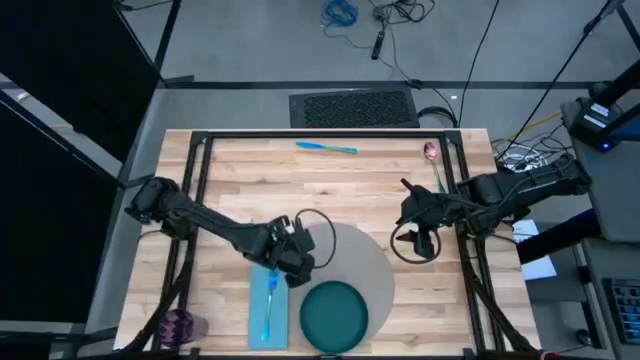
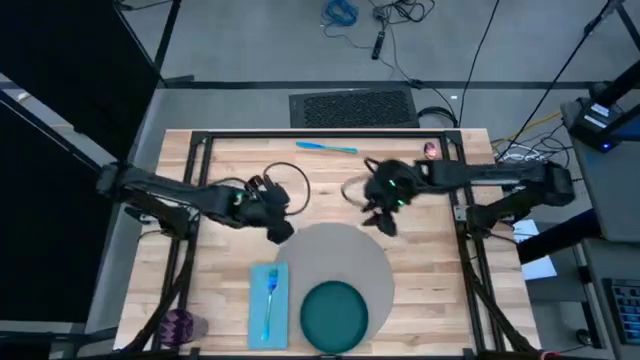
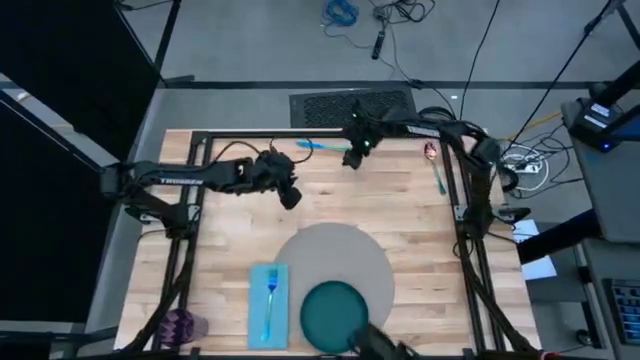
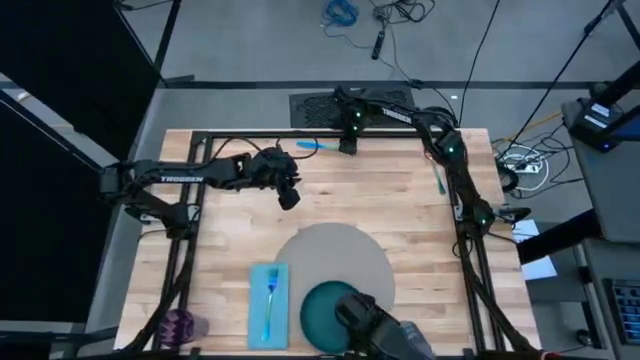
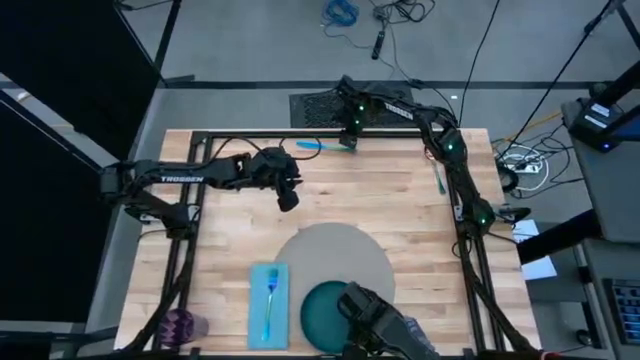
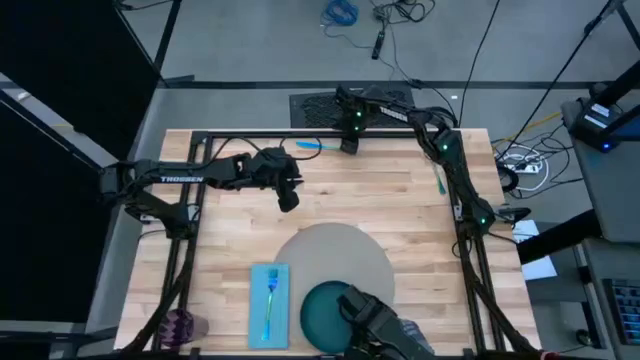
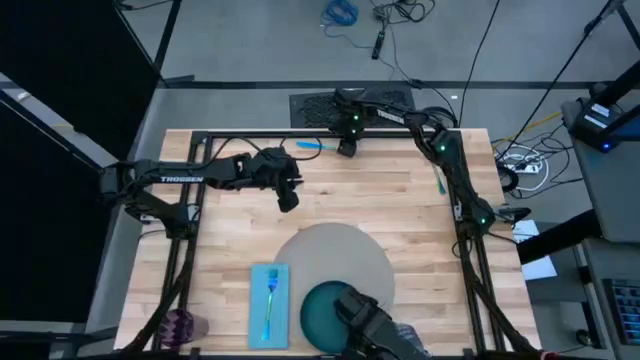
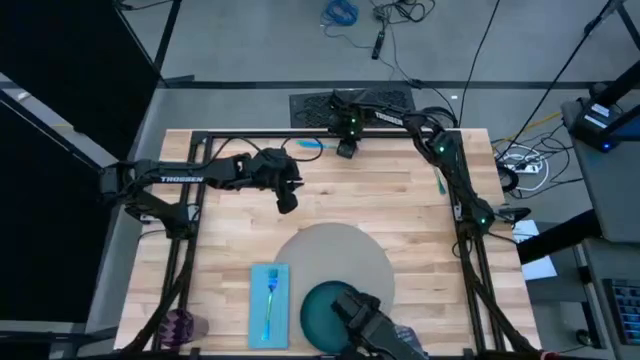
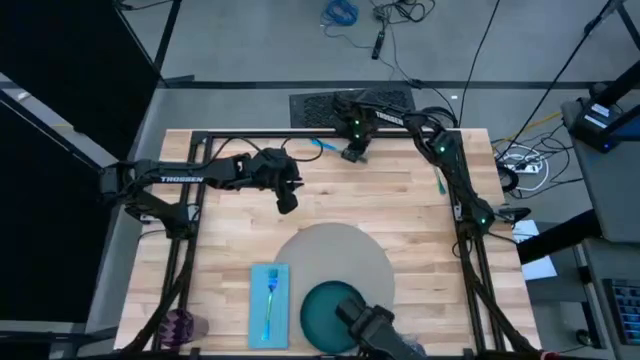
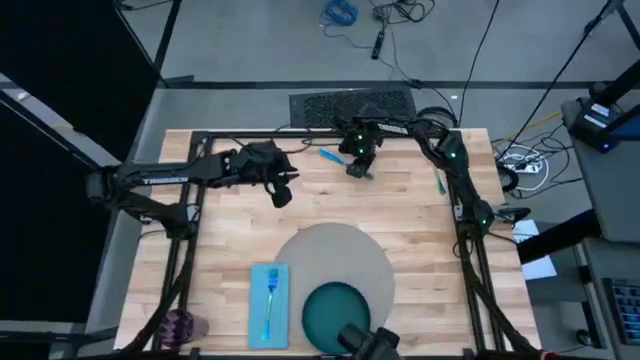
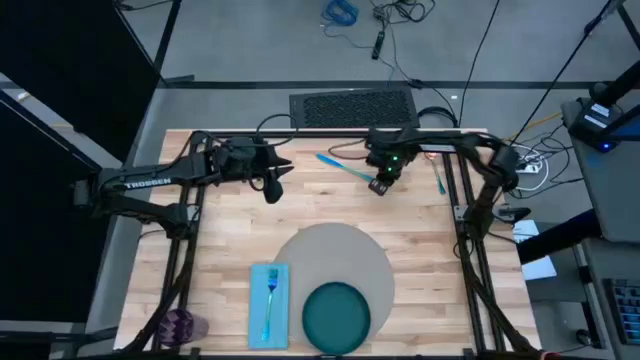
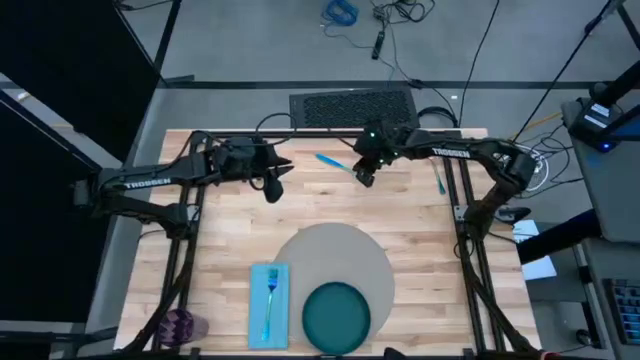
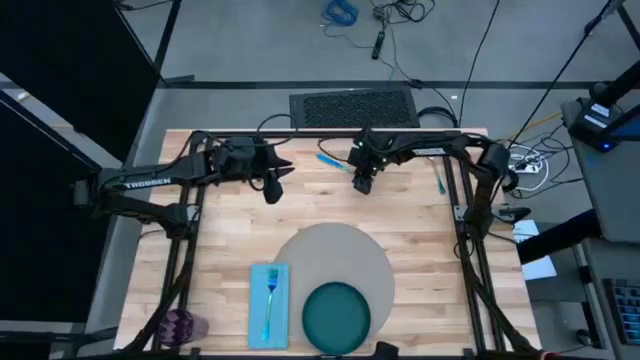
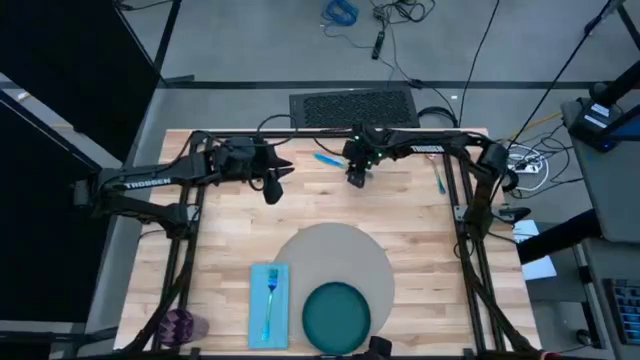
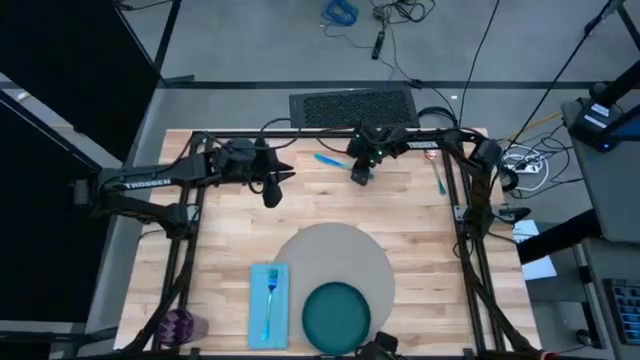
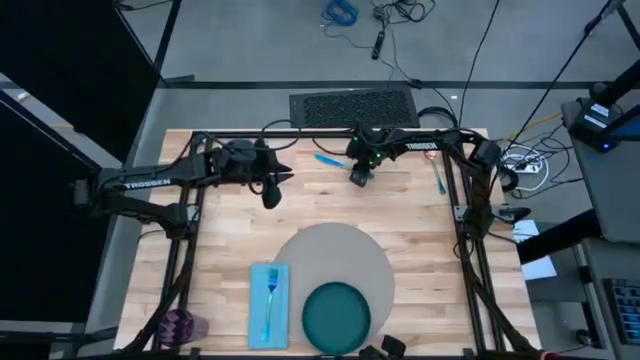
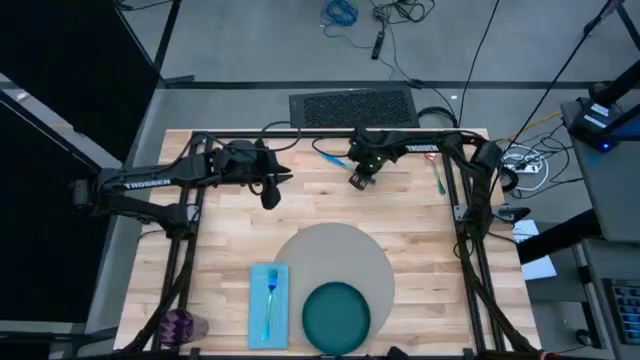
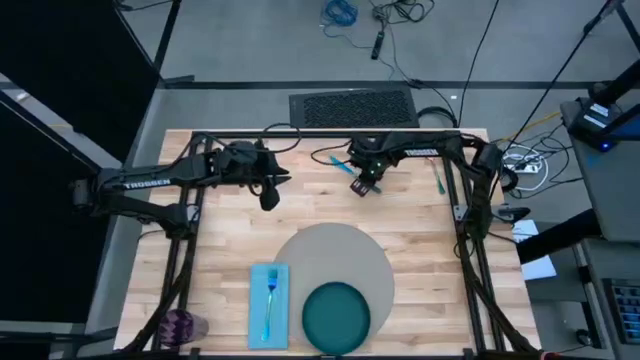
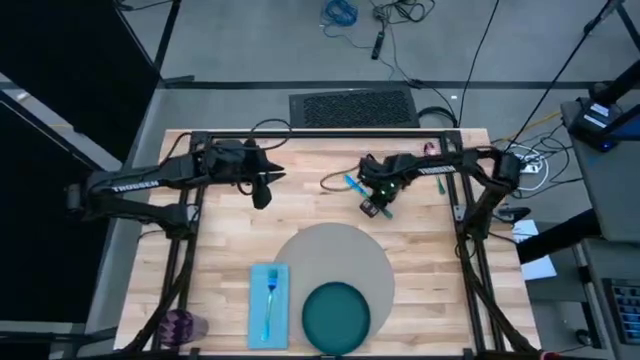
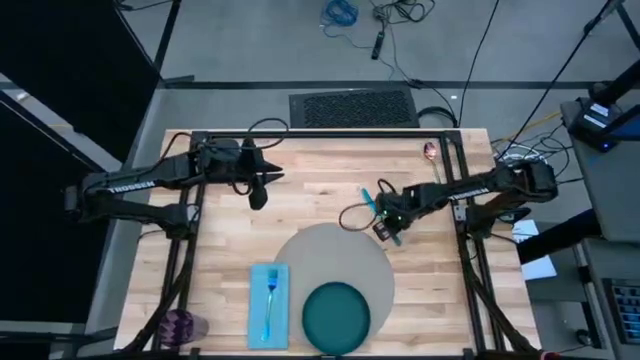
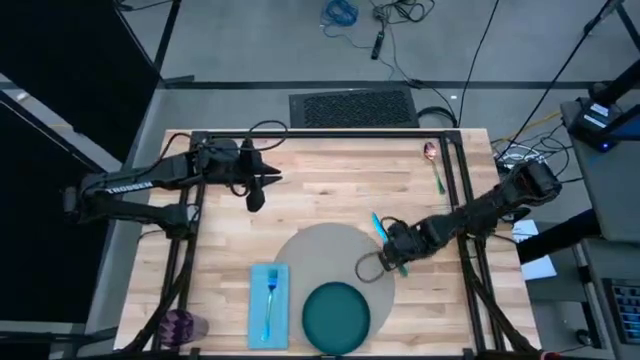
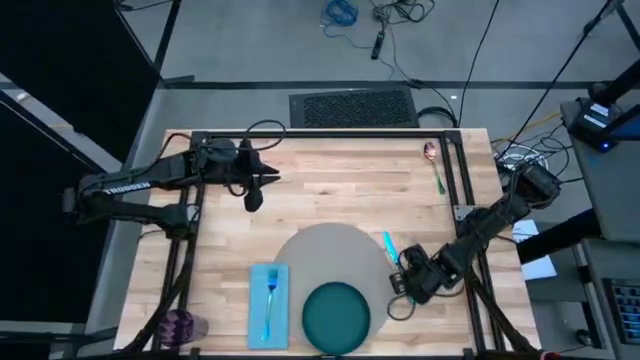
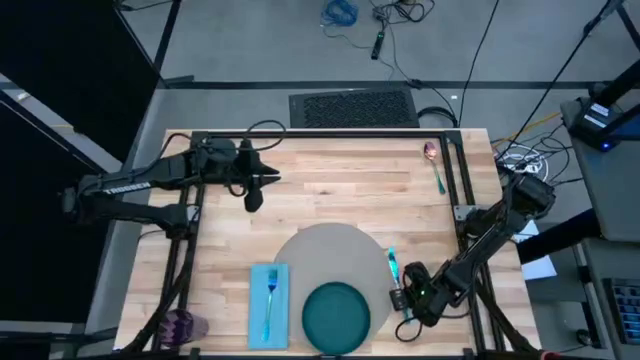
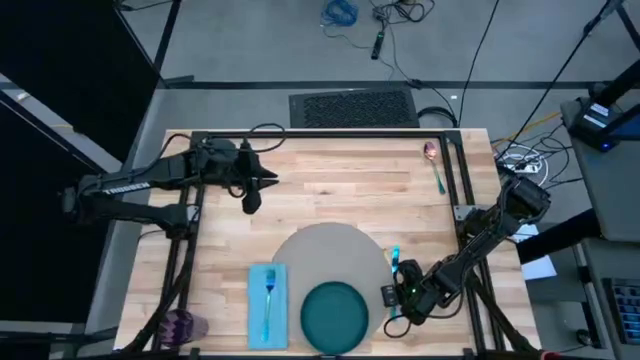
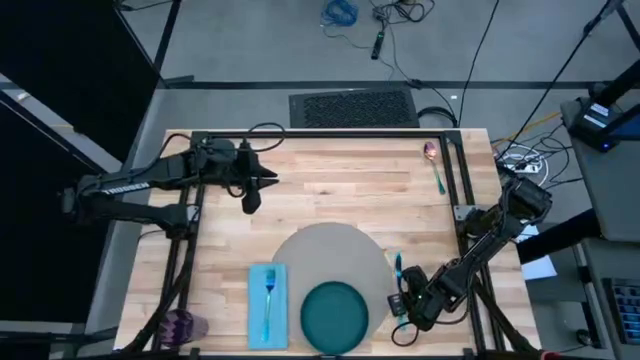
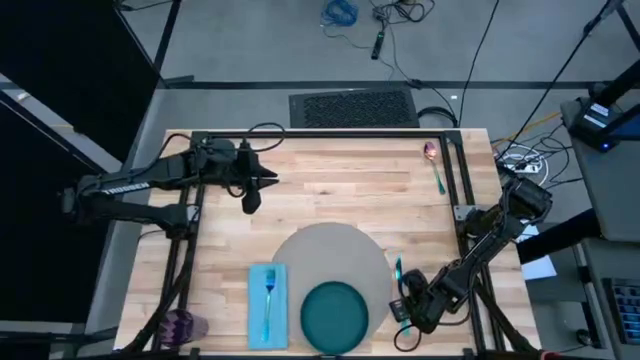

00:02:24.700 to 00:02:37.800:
Task: Set table place
Put the blue table knife to the right of the brown table mat

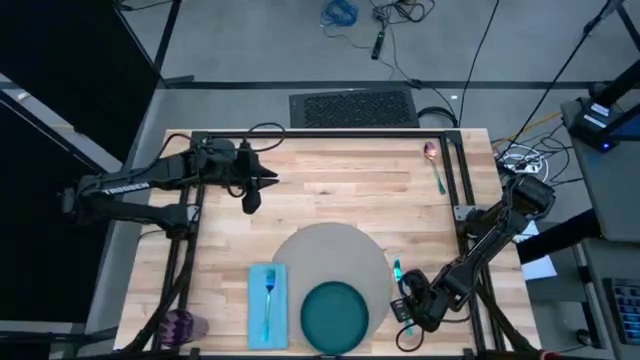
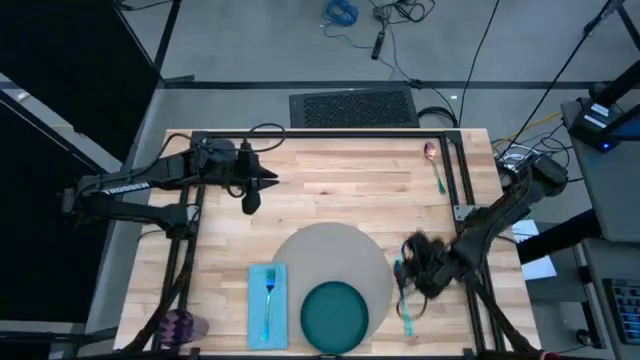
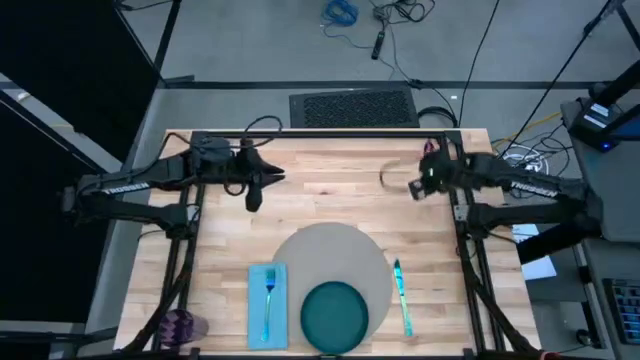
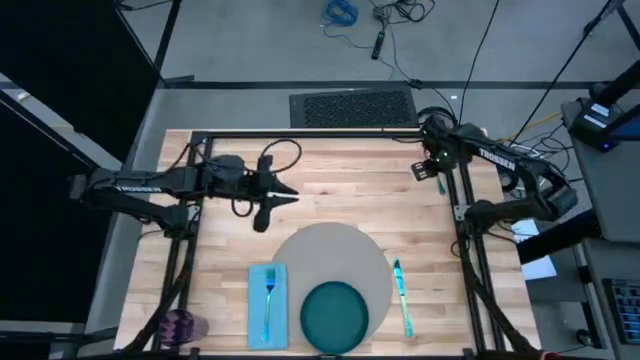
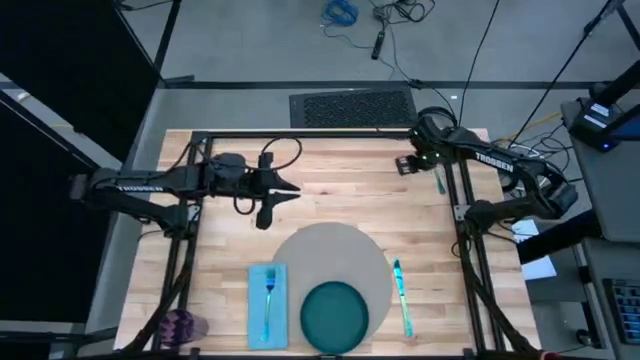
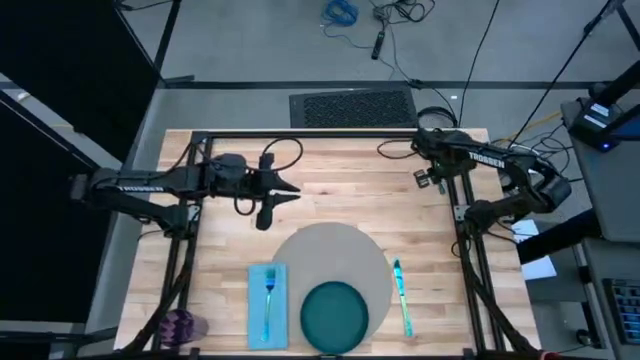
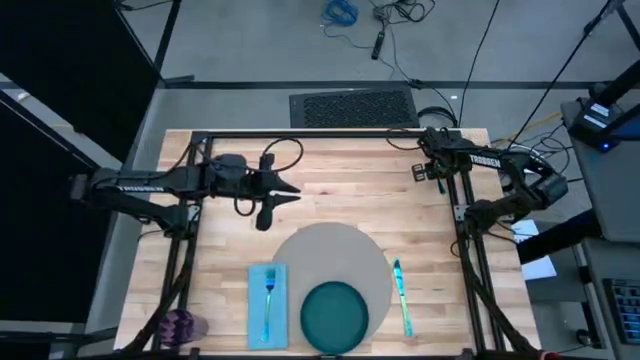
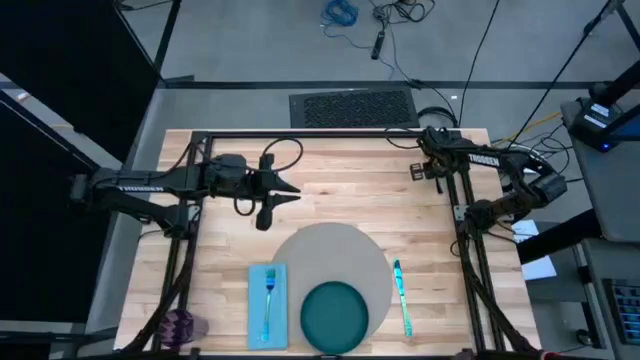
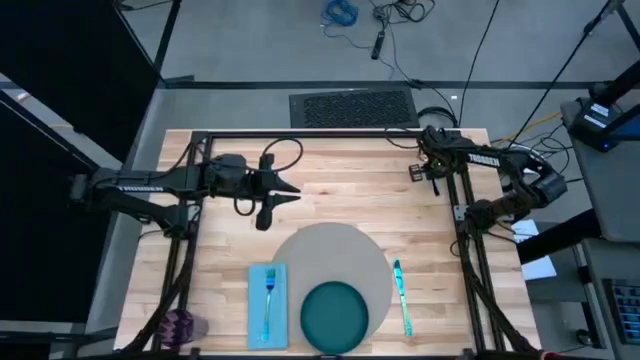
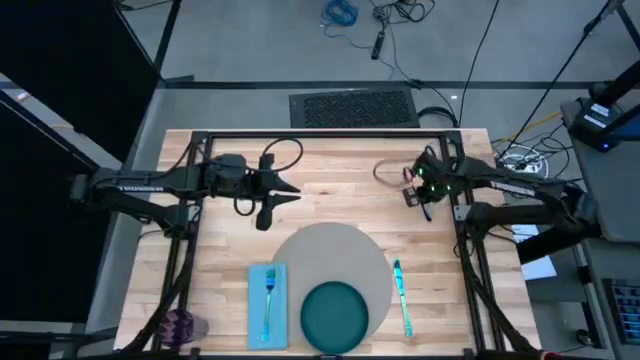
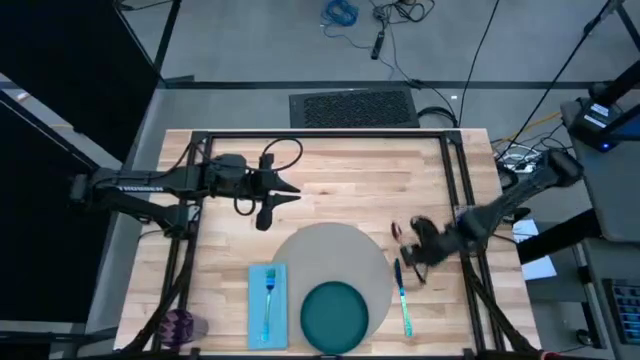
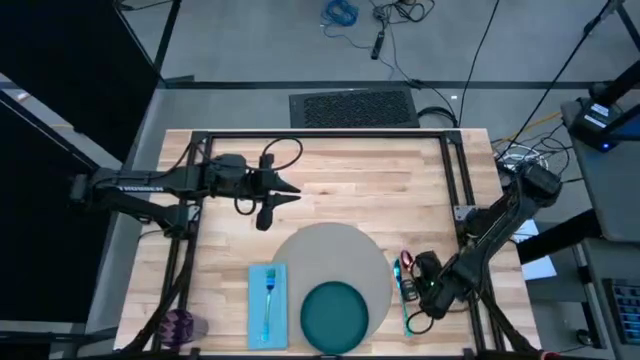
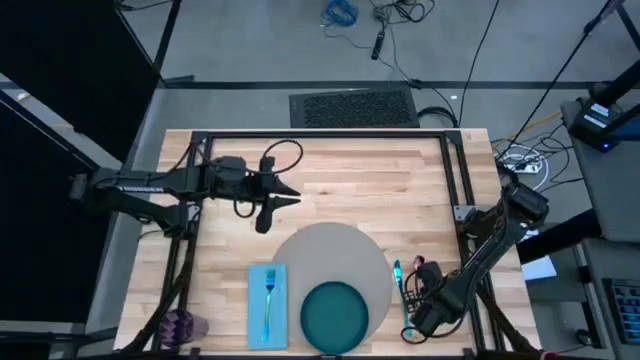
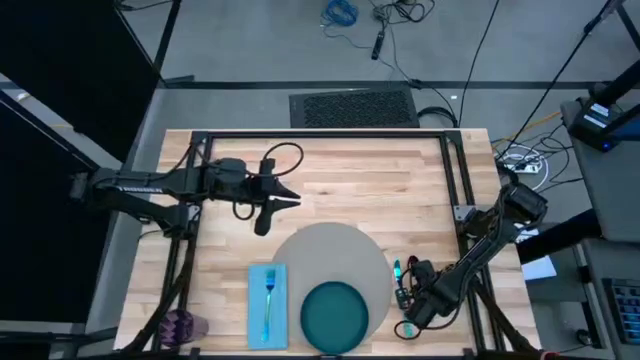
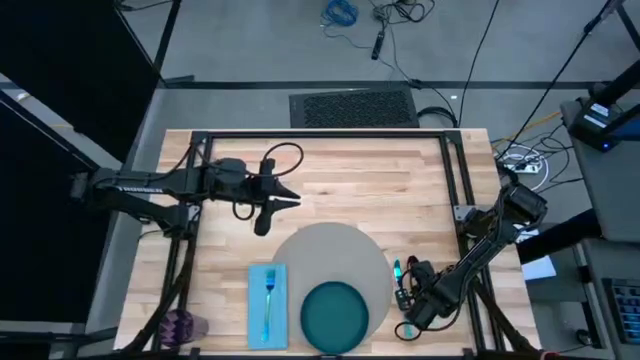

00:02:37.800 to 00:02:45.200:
Put the blue spoon to the right of the blue table knife
